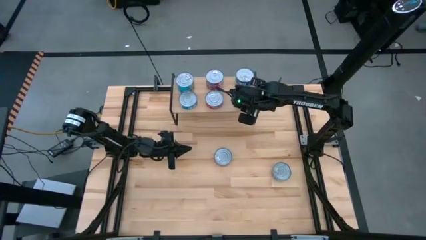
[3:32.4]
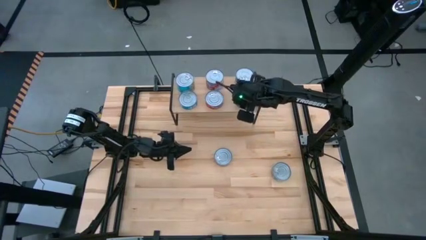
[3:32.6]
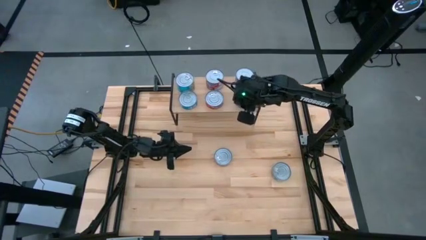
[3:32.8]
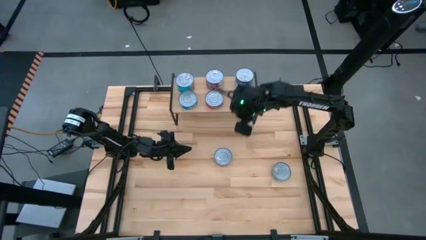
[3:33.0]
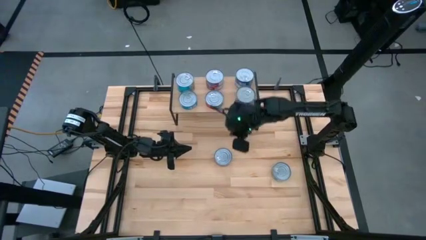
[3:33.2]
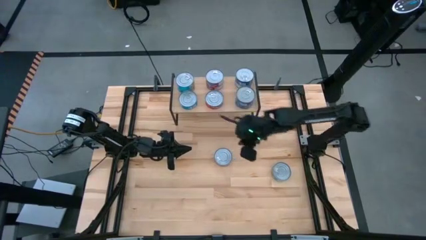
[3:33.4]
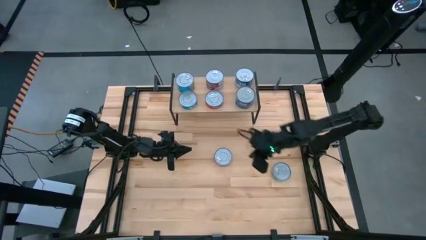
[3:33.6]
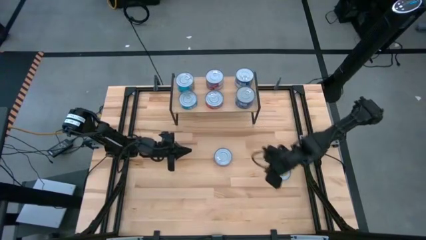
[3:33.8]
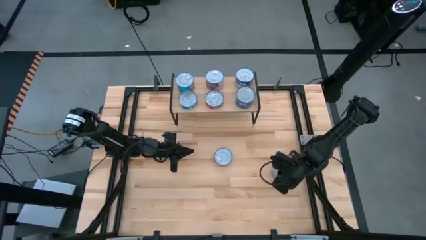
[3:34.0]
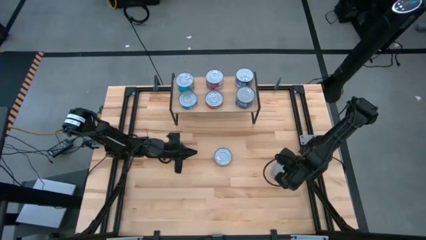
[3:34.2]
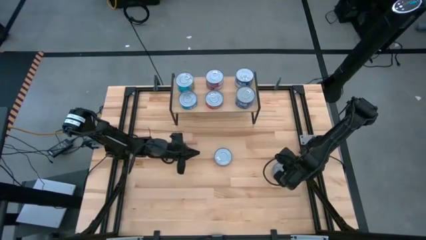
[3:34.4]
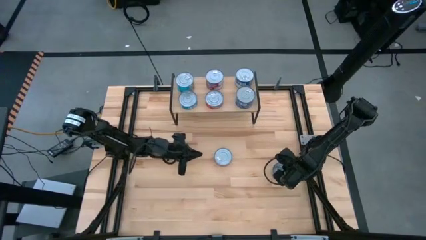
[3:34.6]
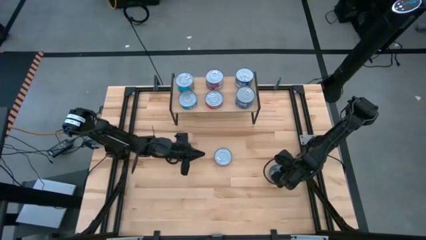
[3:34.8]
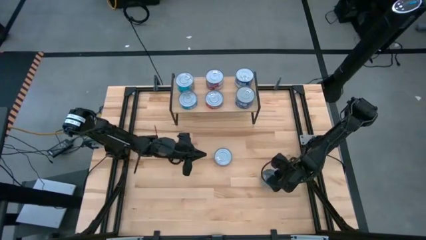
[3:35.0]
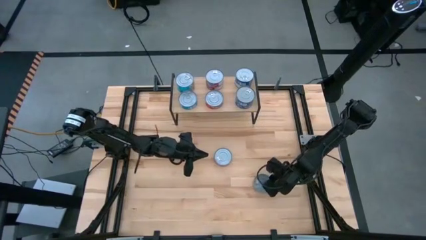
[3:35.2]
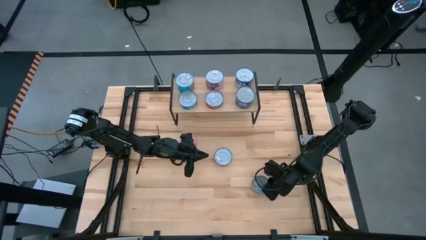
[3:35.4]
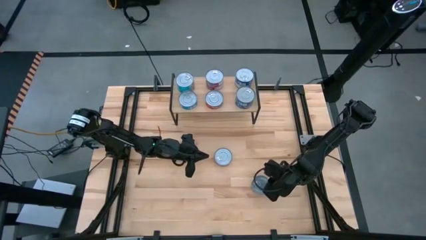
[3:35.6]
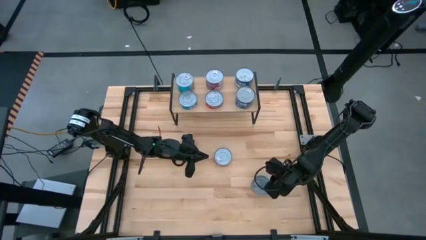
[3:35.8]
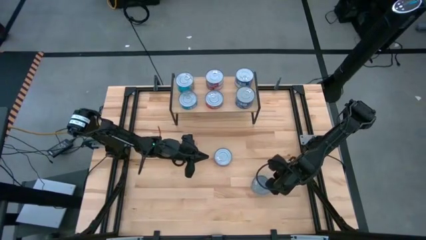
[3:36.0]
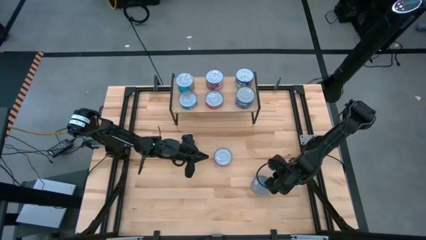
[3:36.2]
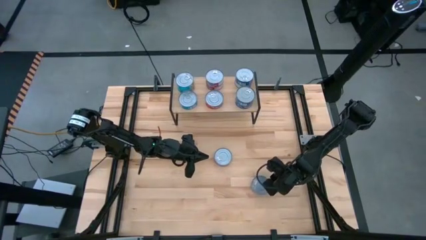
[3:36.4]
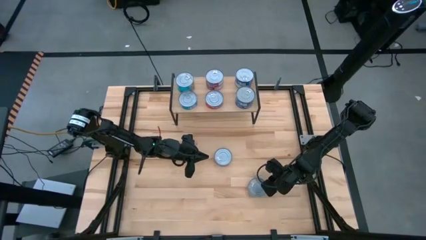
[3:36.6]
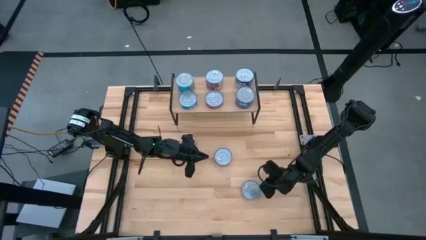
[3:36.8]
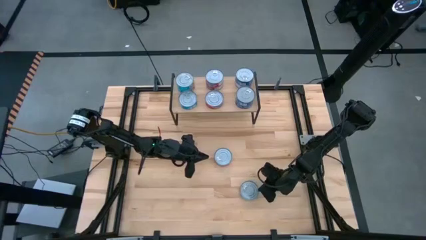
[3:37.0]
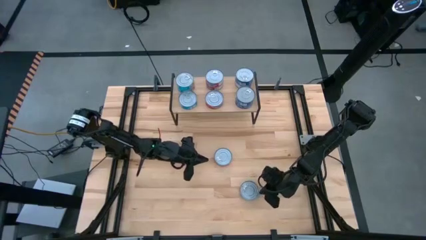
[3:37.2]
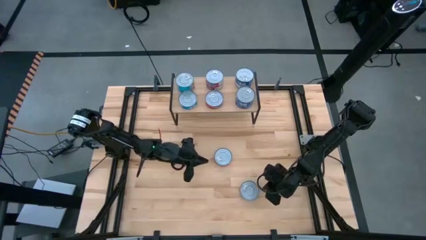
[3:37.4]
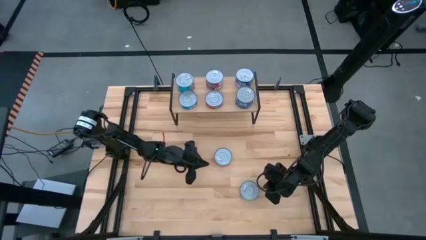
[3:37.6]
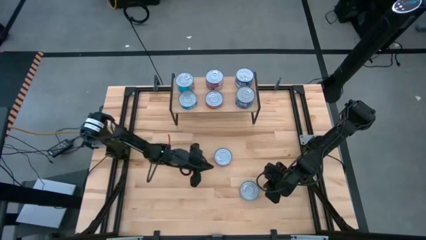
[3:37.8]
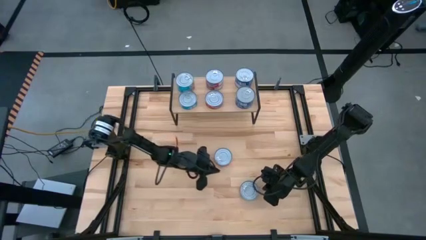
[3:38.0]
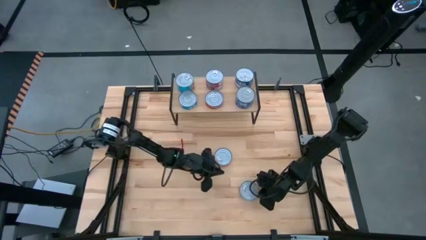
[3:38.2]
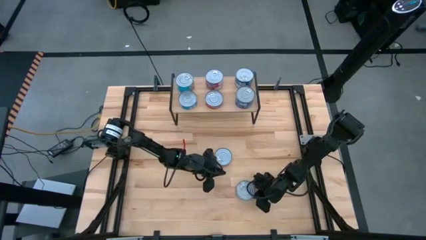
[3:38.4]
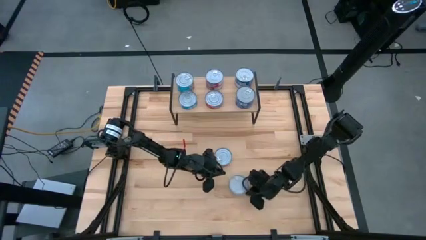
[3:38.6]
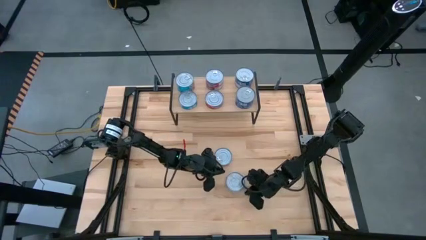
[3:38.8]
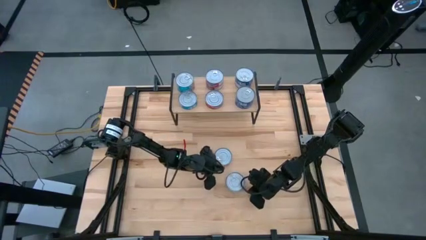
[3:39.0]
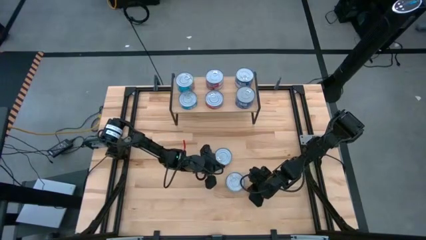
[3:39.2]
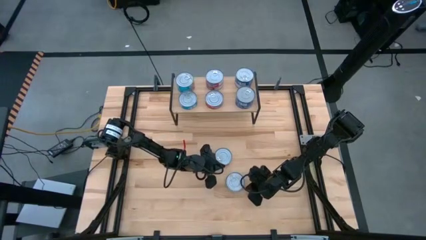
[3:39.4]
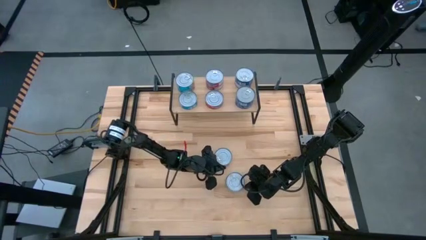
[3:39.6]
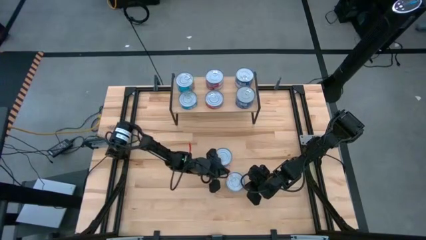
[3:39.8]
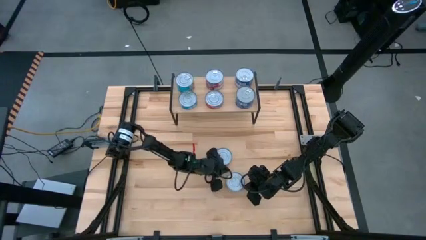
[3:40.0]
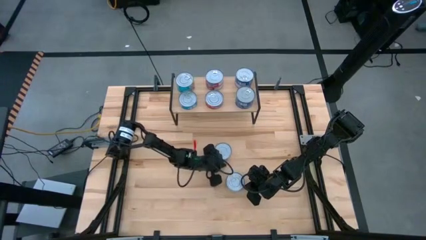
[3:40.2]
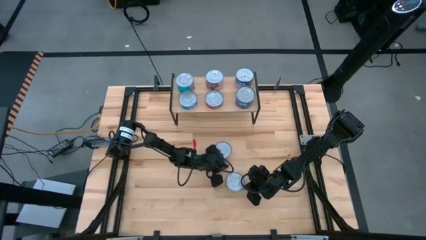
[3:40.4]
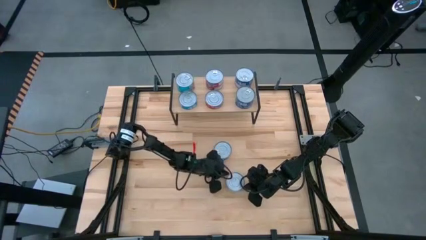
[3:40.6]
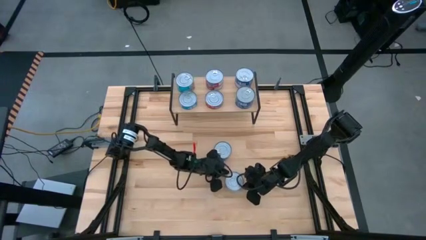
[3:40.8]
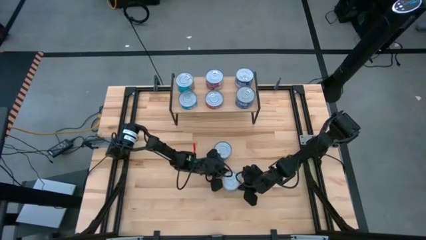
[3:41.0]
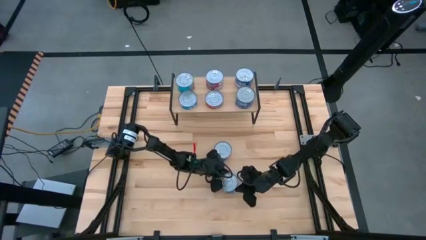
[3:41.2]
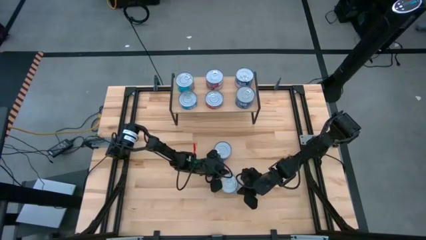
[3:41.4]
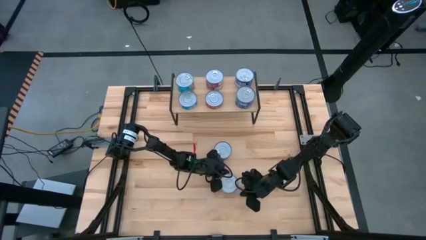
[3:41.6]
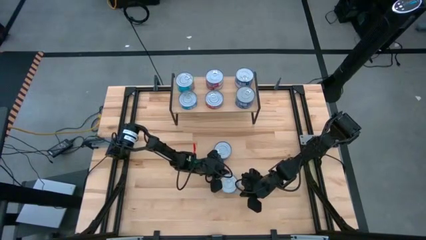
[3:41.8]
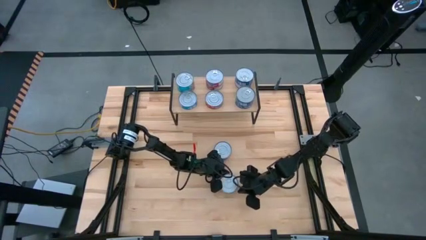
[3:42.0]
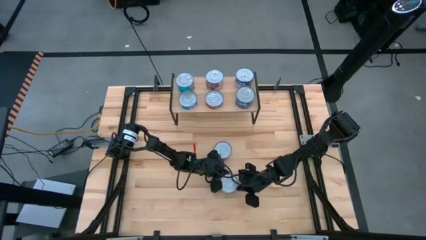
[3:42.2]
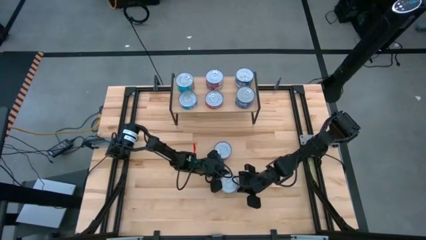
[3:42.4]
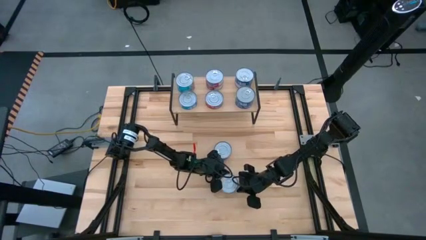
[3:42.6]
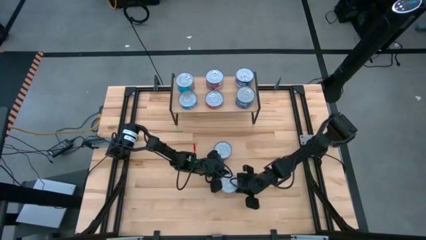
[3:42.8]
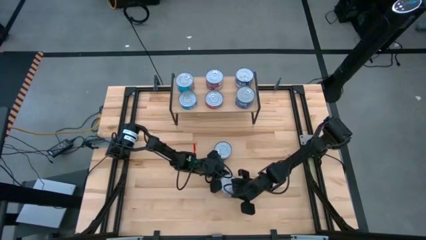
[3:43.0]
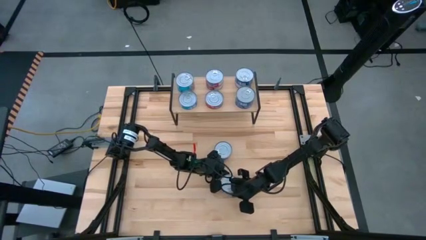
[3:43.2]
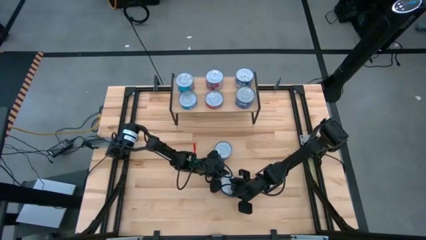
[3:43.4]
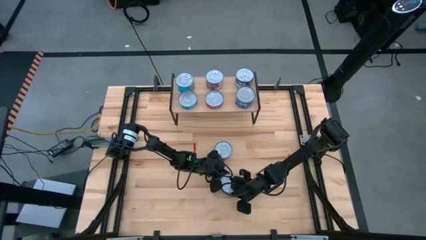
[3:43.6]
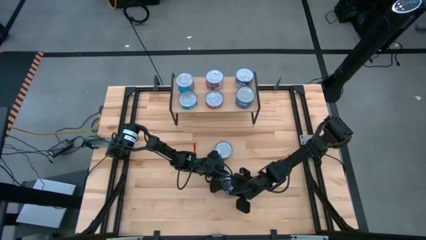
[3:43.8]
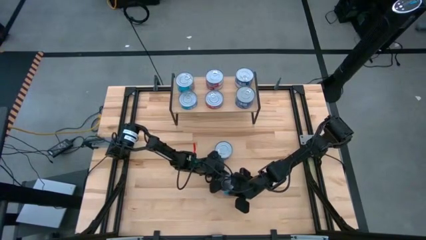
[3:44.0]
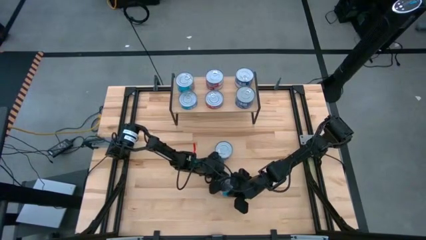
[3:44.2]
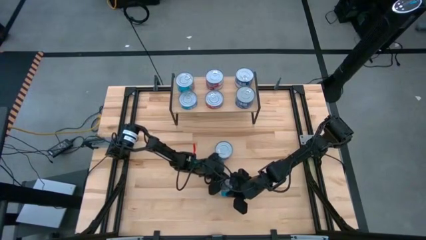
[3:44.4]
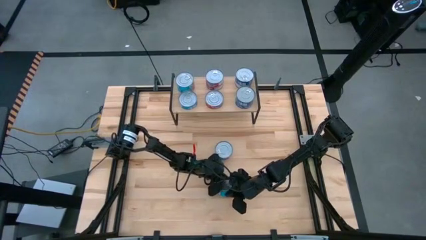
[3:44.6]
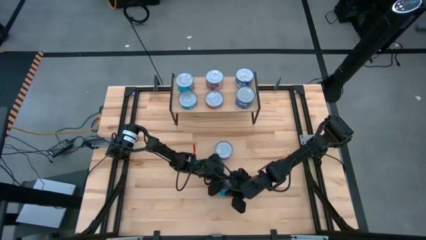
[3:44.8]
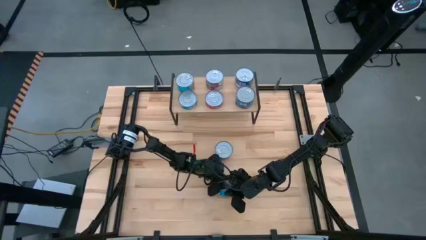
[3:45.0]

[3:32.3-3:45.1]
Task: Stack canned seafood by type on shelf
Stack the yellow and blue tuna can on top of the other yellow and blue tuna can

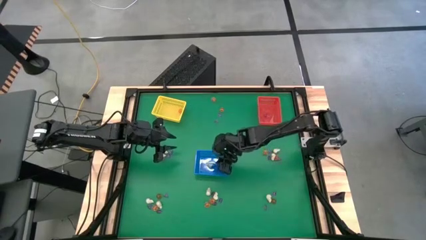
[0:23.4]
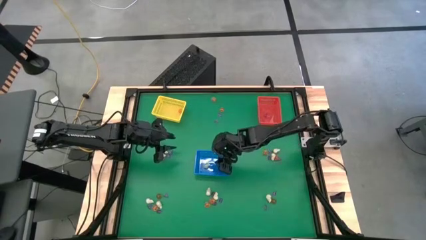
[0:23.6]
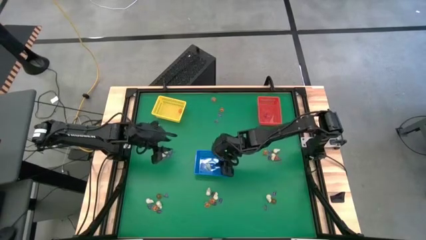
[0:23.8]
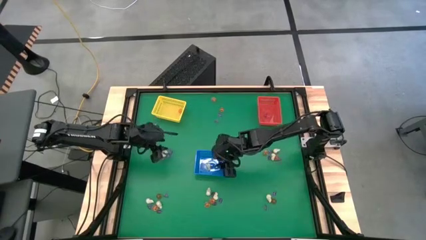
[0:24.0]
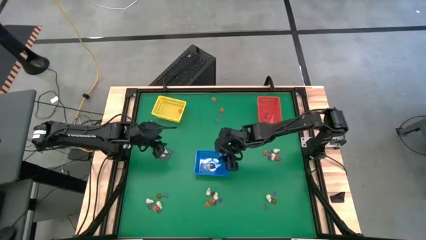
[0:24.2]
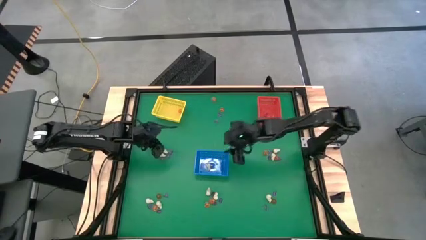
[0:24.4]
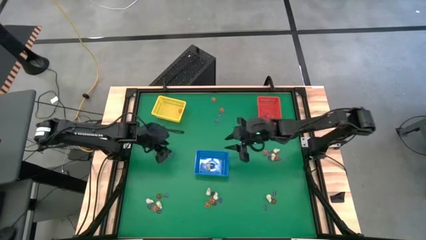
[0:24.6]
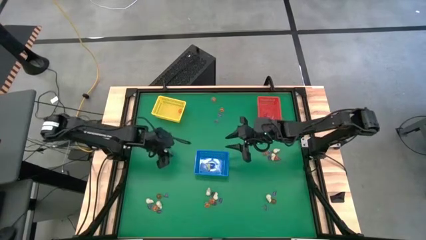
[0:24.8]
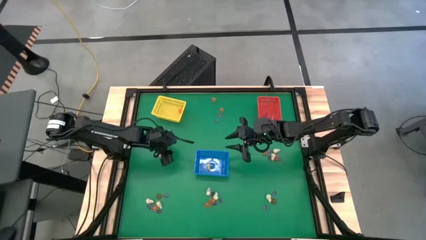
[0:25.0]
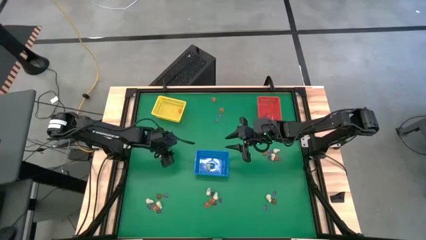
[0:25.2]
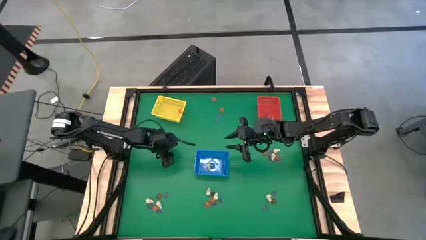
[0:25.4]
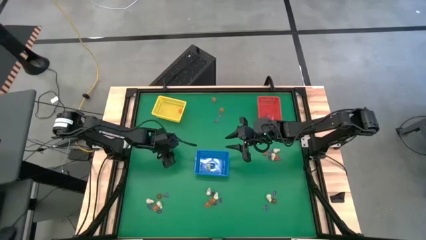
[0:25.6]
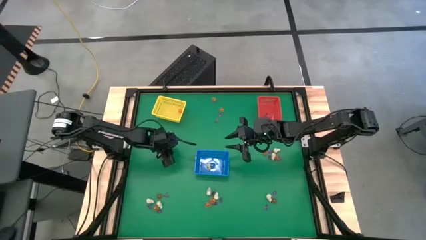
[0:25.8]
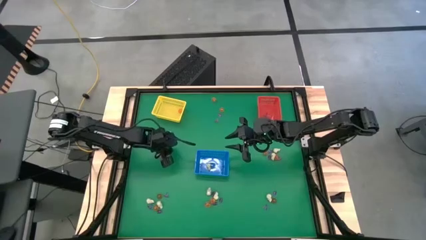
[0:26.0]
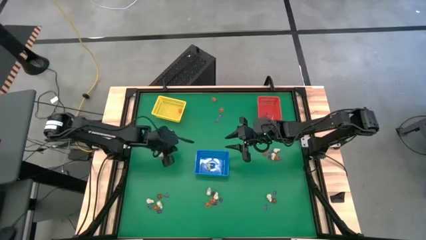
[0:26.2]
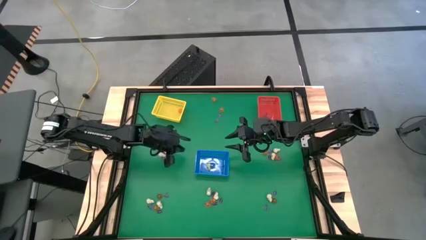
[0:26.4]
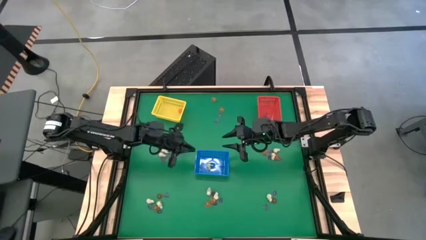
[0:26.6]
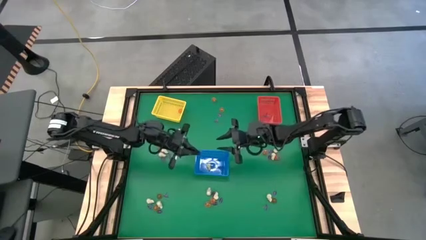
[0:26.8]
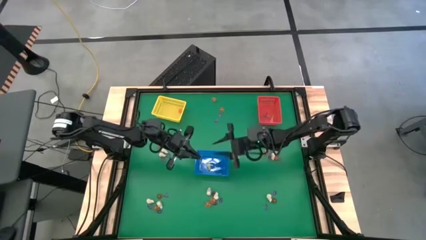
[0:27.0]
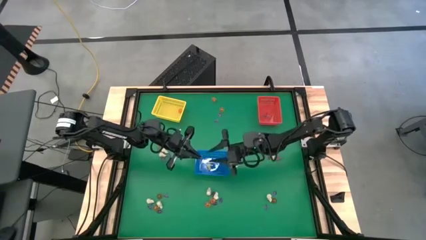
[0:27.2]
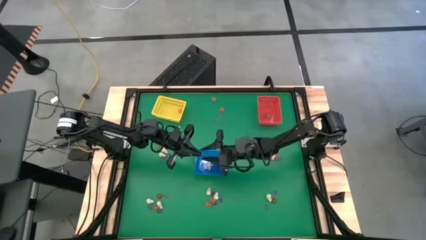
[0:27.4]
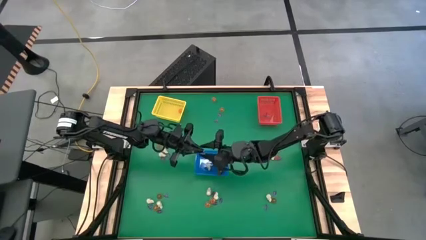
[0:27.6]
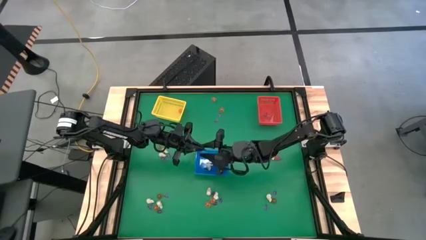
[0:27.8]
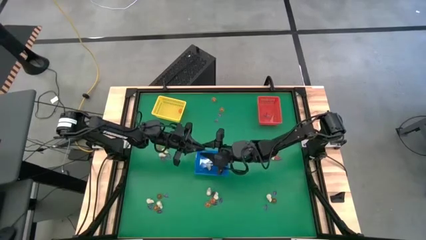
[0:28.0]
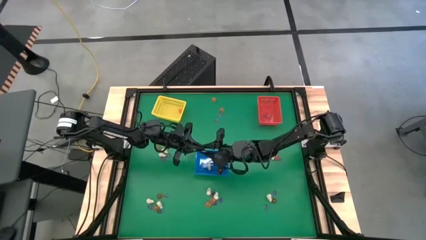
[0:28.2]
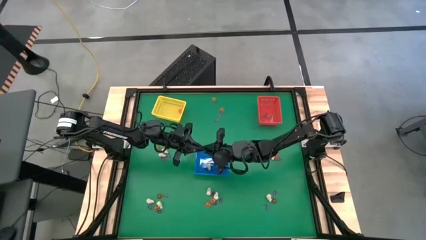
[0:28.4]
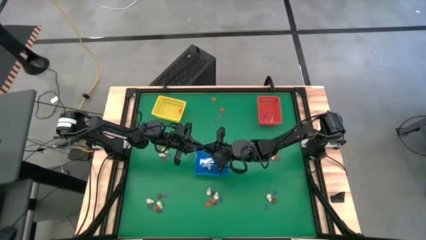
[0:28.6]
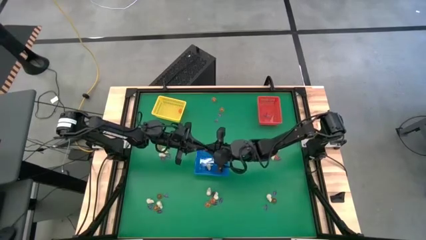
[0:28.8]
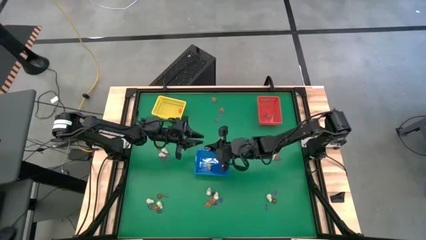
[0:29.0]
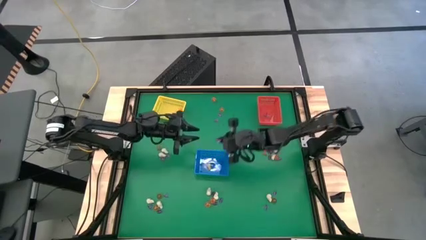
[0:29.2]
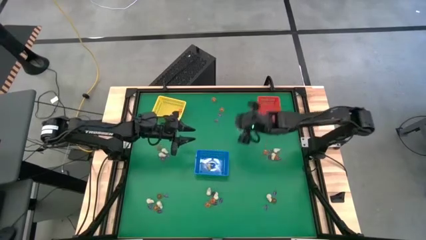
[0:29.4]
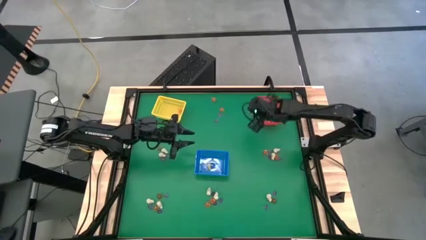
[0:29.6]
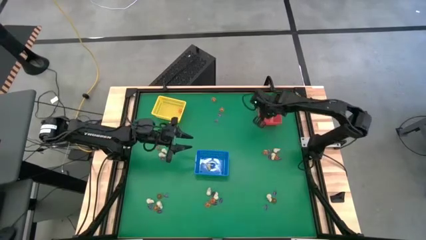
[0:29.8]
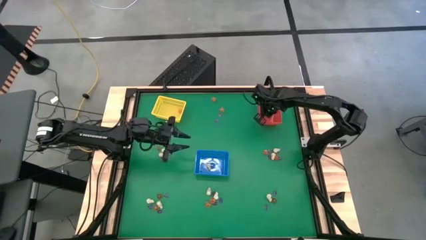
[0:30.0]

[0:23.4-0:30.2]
Task: Sort Halloween decoration
Put the purple witch hat toy into the red bin
